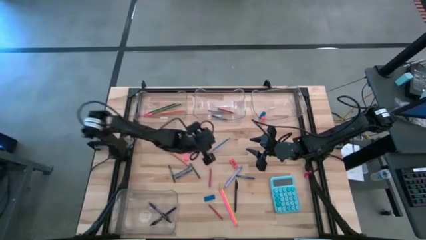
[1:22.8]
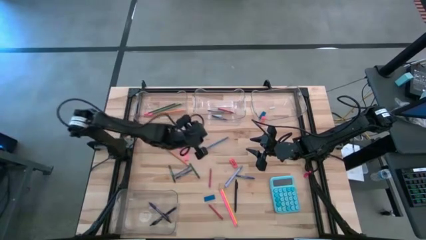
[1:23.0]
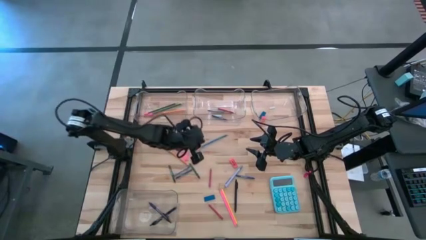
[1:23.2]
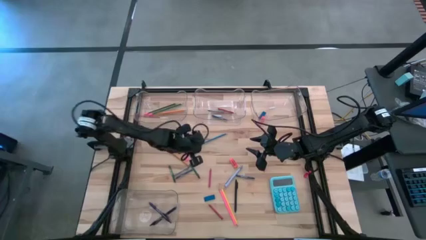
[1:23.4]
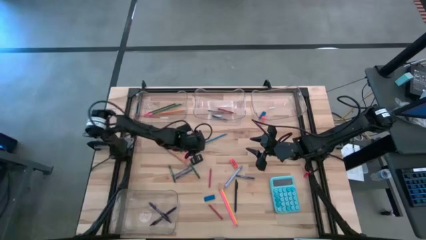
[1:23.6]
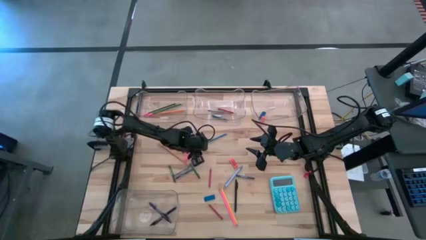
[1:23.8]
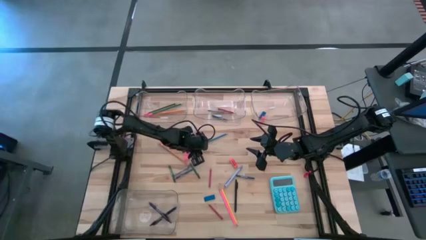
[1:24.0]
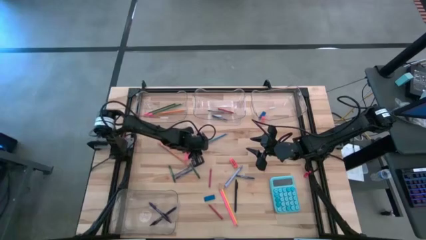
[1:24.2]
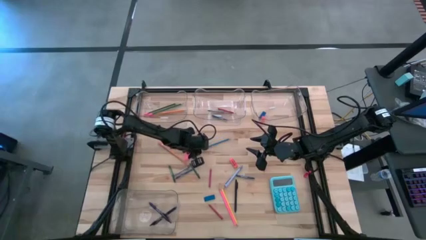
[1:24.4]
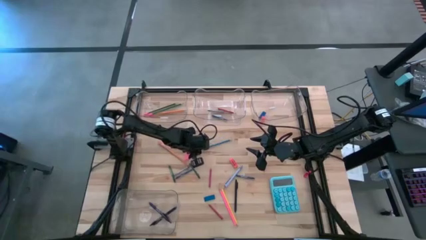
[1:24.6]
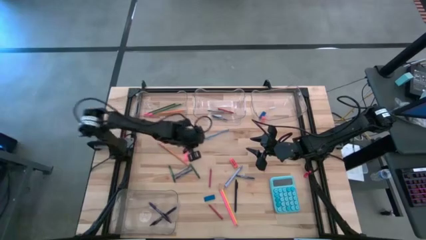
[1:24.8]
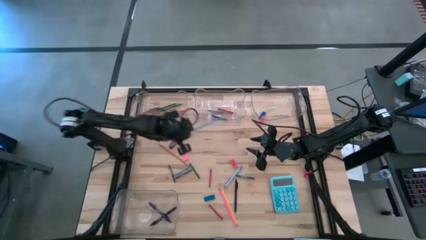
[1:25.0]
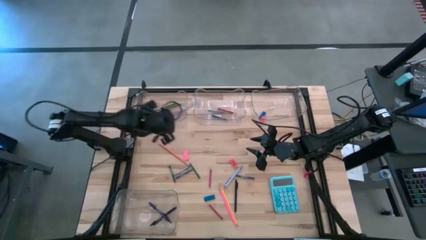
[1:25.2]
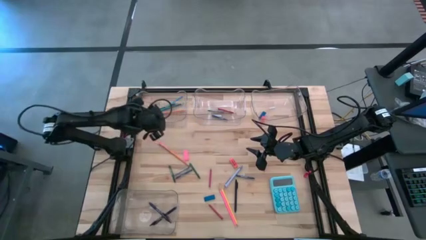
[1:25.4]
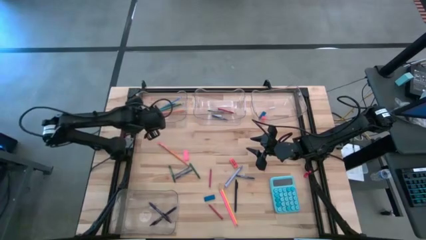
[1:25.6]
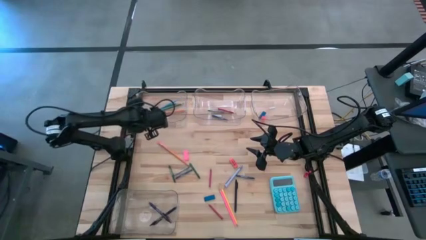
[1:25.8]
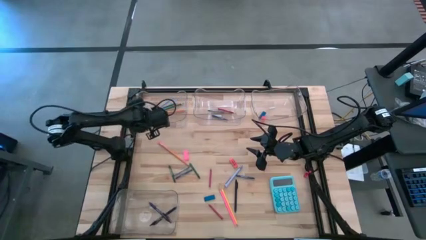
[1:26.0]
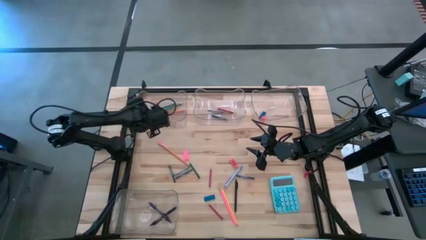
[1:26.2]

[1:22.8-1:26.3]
Task: Sort crayons/erasers/pens/pencils in bins
Put the blue colored pencil into the top left transparent bin

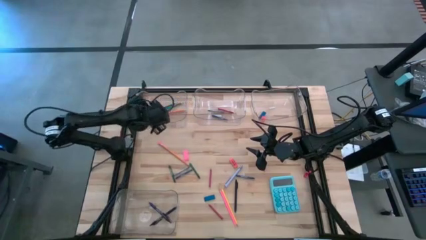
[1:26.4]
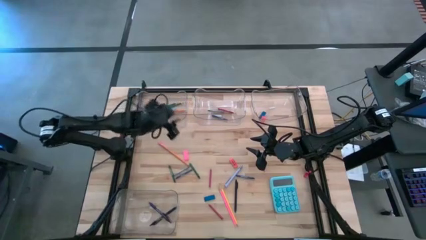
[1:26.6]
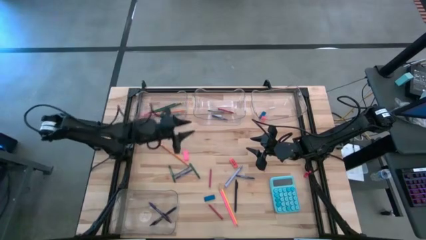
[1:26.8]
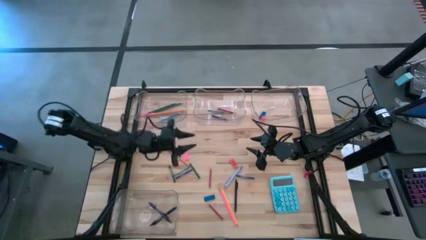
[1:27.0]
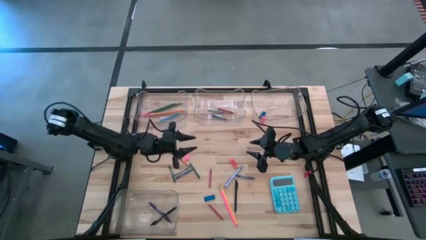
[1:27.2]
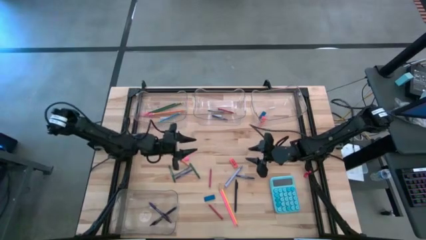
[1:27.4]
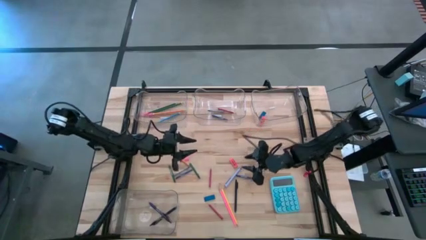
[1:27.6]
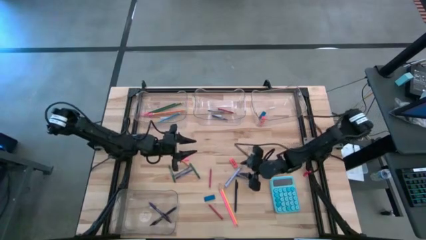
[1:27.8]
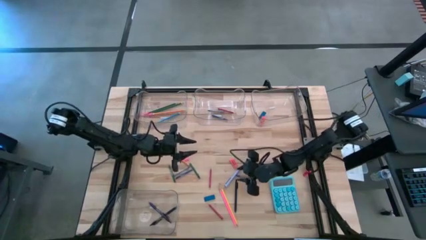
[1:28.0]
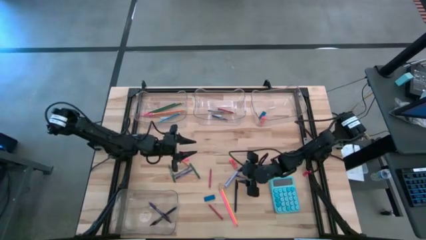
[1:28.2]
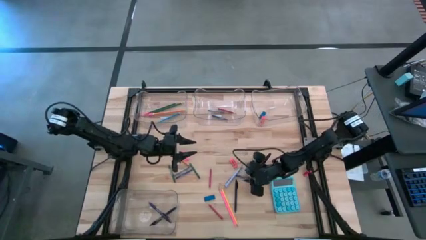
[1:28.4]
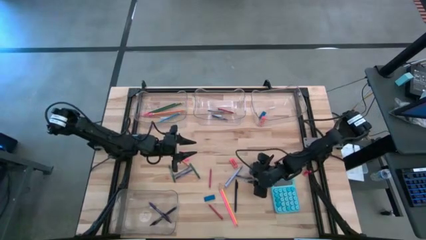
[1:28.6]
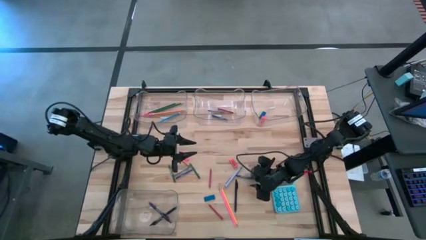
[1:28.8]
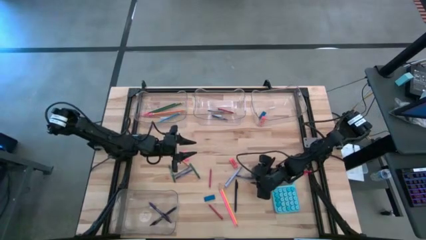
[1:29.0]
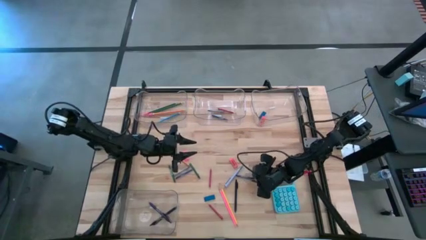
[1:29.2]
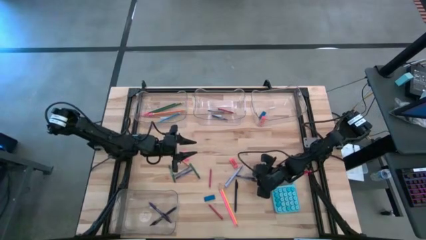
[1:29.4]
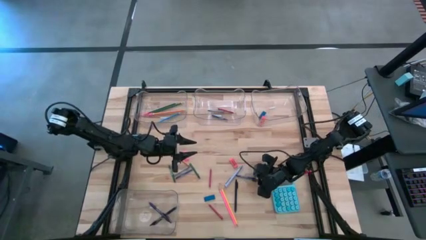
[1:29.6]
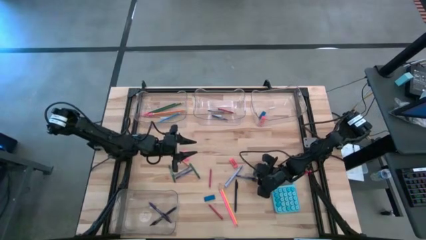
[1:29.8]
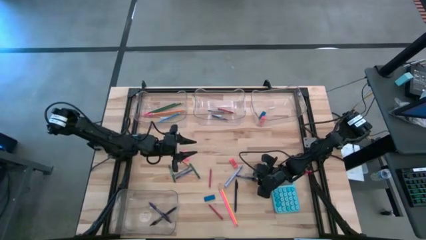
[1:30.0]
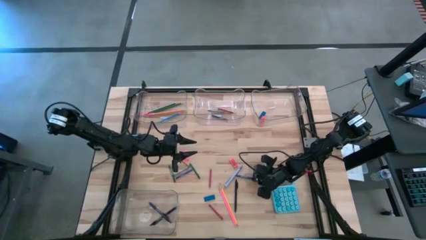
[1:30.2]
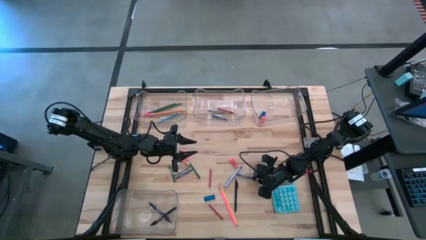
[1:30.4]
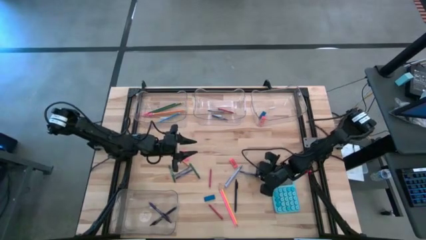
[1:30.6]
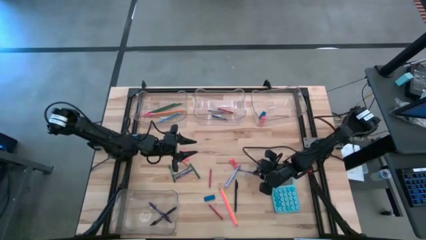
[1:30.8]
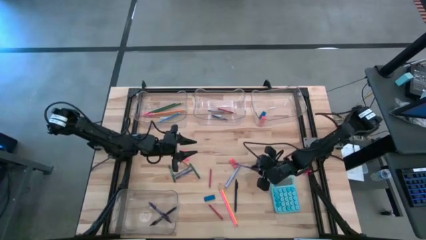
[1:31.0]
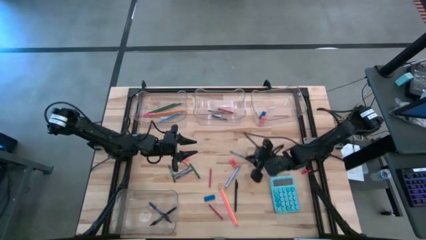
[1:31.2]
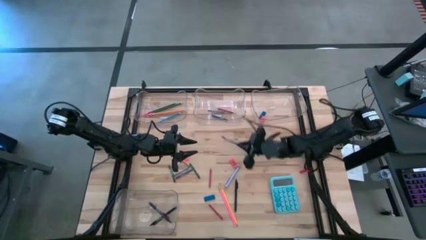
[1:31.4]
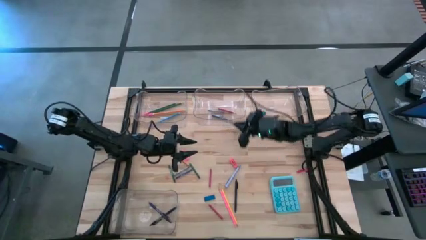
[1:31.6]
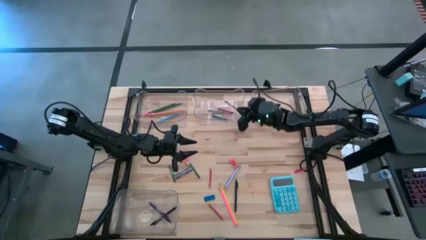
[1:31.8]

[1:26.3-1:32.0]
Put the blue crayon into the top middle transparent bin

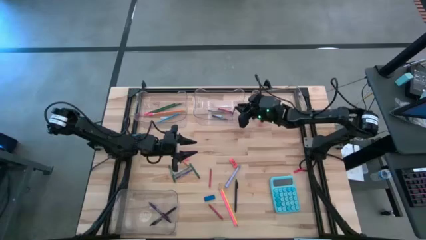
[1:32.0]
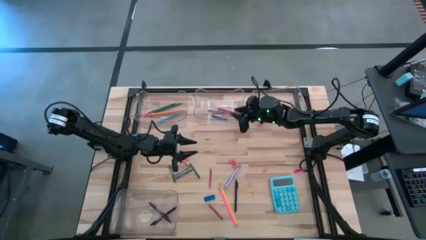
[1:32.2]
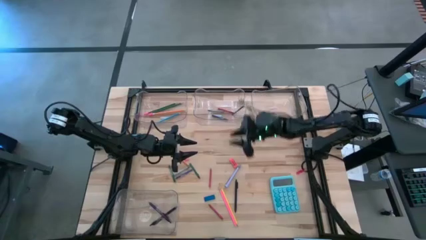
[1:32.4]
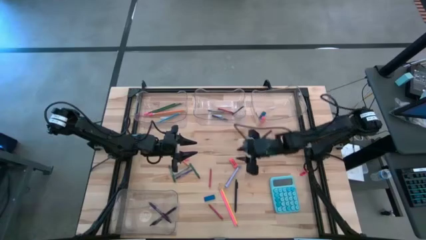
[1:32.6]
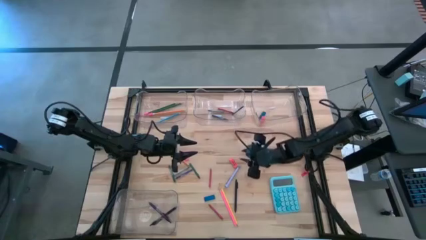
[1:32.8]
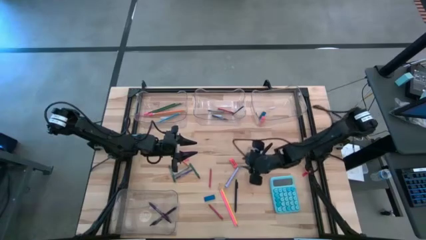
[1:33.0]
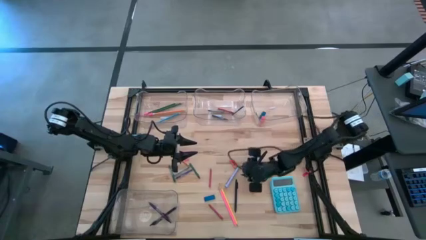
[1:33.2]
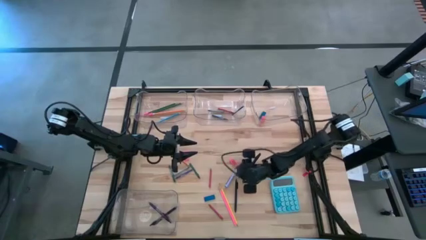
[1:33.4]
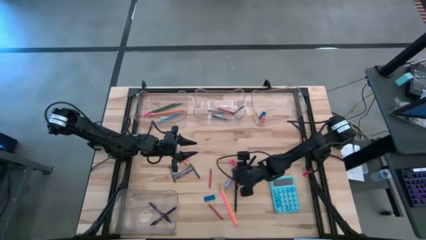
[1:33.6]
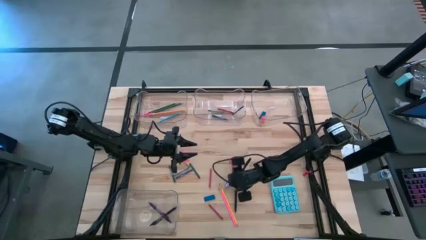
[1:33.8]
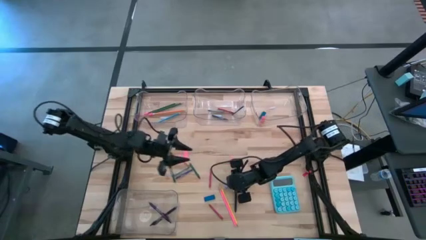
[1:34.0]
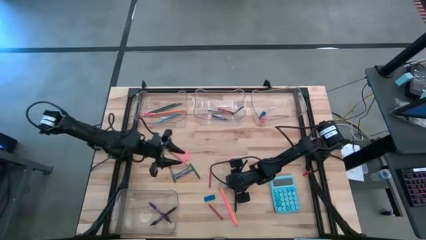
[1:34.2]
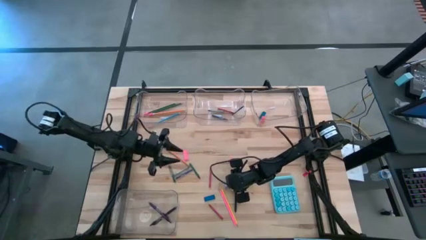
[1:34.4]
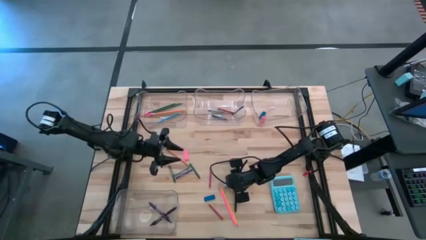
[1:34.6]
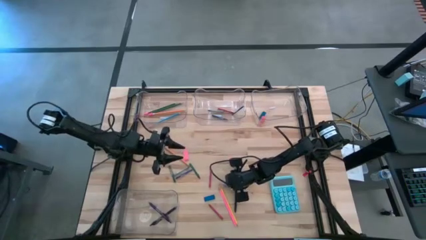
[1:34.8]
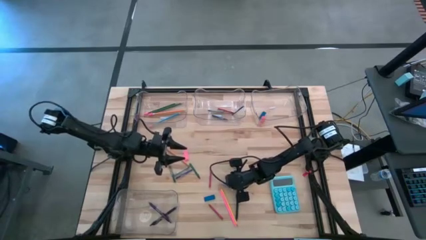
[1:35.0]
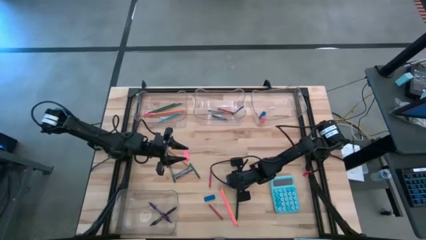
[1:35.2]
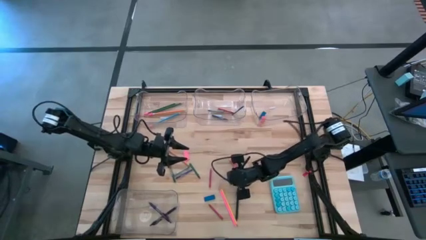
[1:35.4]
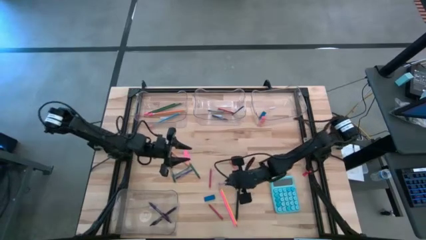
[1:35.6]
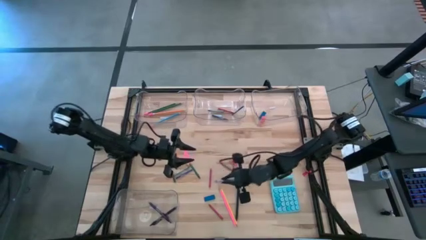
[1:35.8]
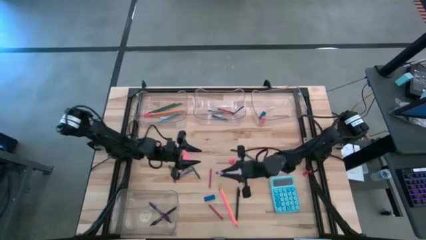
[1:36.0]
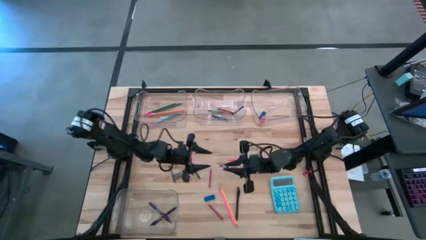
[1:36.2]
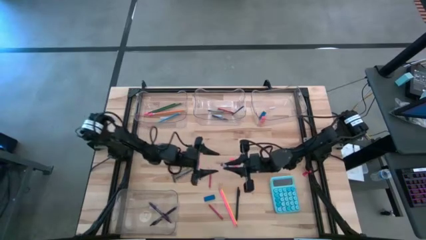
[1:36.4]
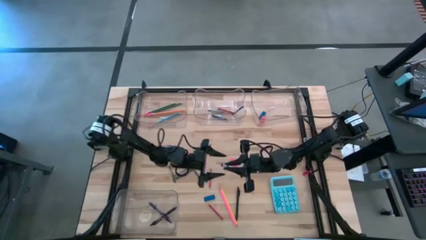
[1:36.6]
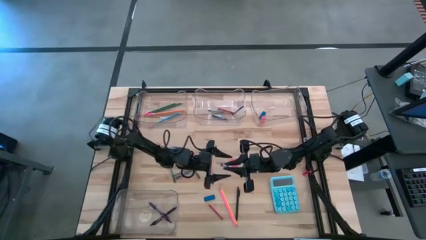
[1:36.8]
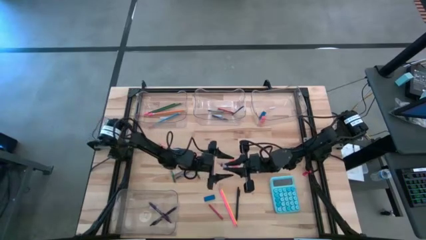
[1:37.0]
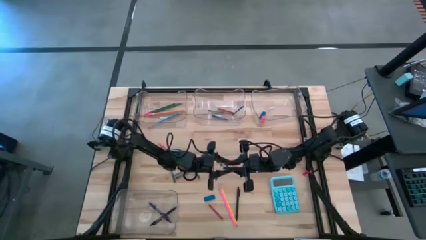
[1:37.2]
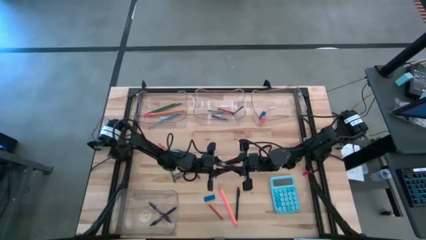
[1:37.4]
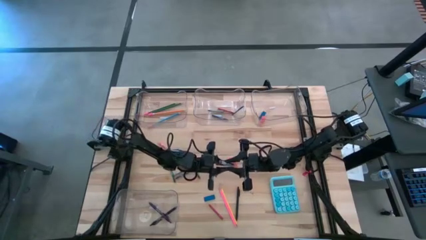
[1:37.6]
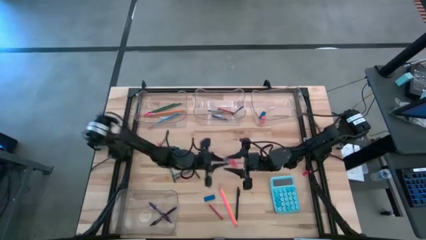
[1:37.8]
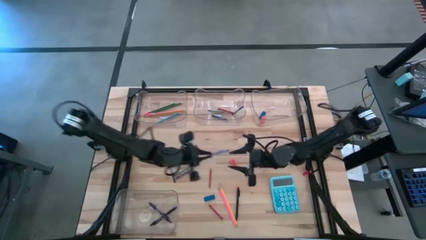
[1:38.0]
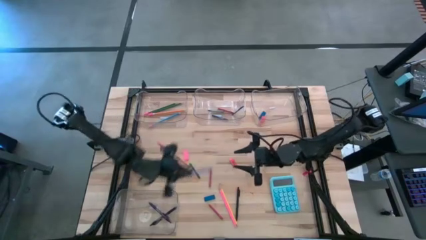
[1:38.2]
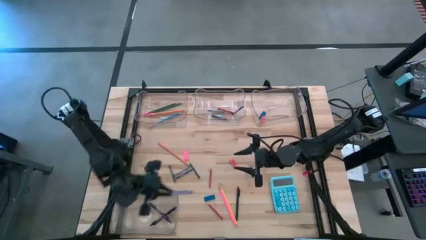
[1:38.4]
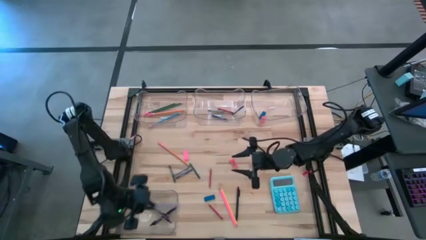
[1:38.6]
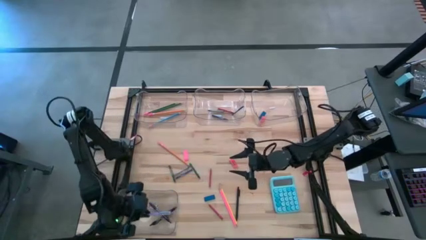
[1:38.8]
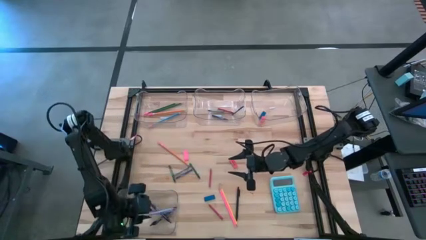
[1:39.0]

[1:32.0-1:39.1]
Put the purple pen into the bottom transparent bin

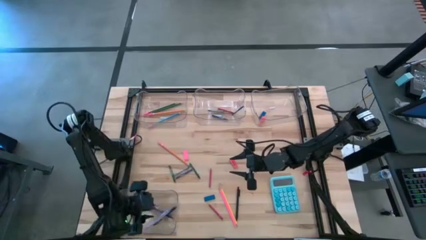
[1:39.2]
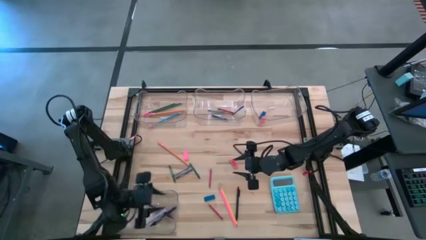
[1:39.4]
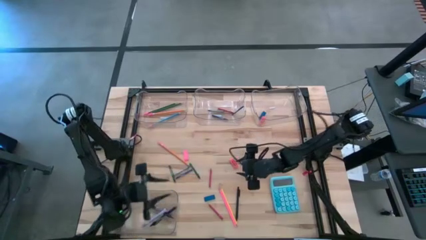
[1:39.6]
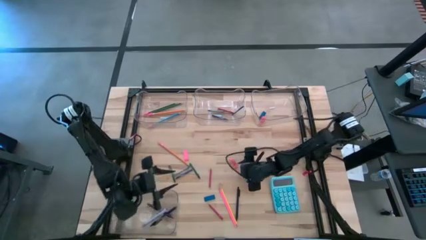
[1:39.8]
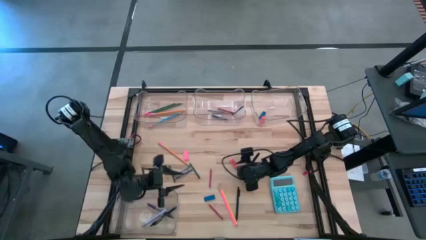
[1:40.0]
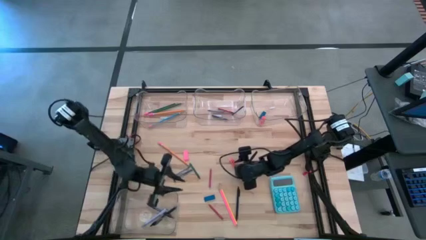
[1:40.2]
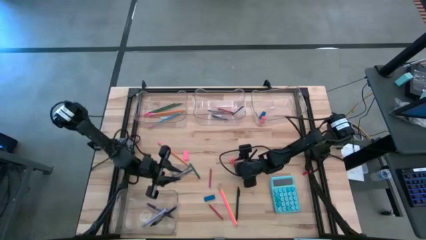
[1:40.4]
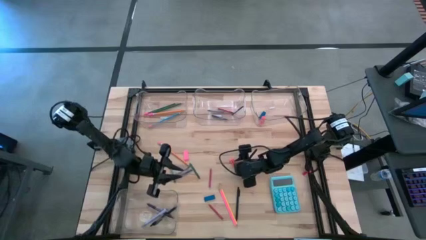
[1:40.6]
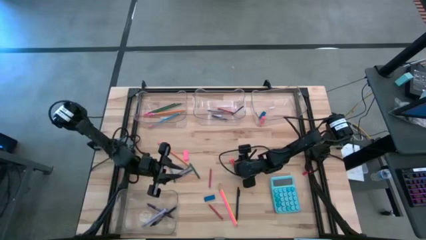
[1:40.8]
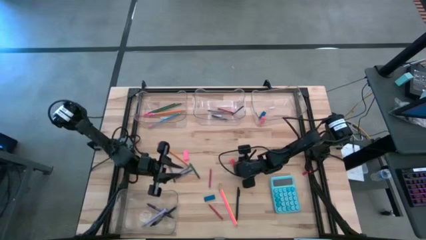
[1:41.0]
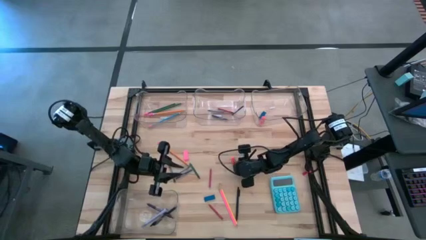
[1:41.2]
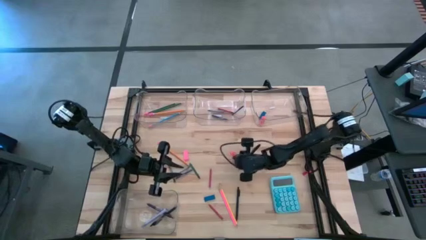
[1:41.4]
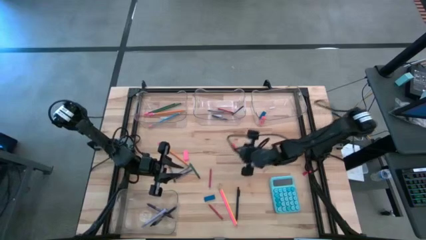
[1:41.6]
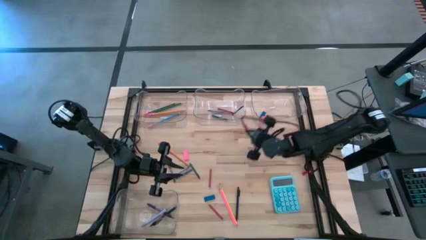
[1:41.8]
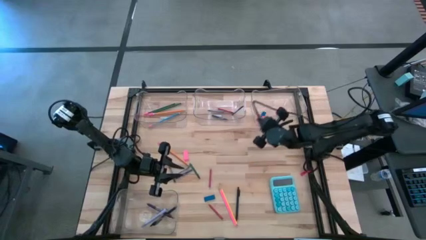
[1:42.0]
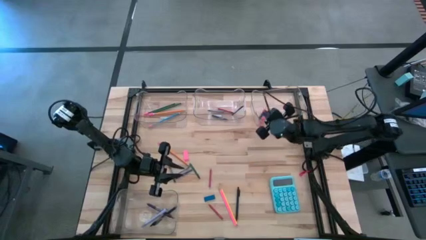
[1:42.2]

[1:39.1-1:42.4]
Put the orange eraser into the top right transparent bin
